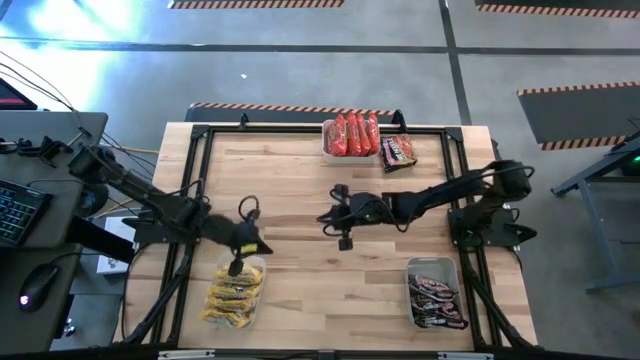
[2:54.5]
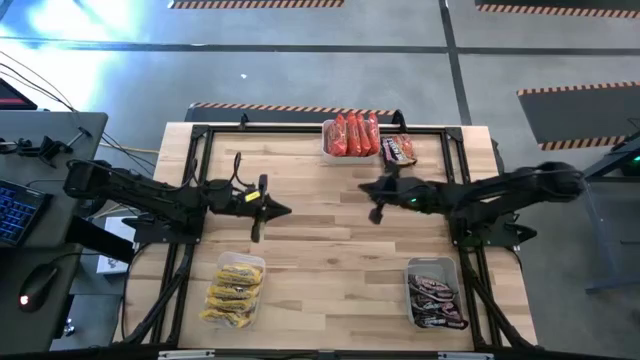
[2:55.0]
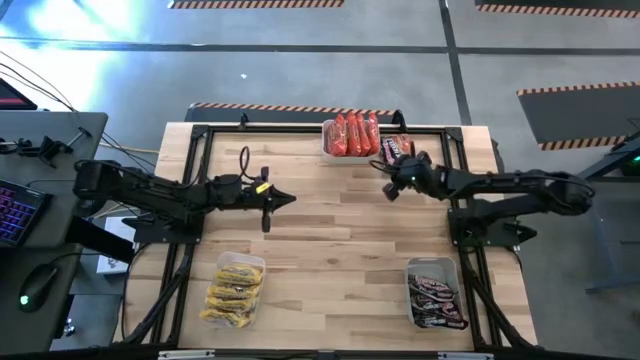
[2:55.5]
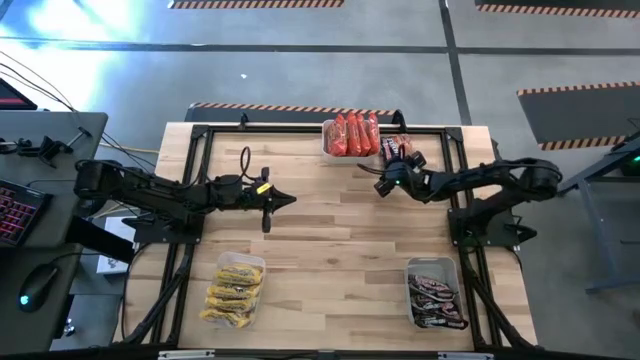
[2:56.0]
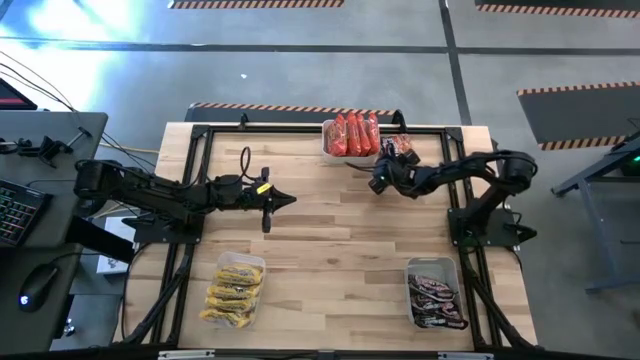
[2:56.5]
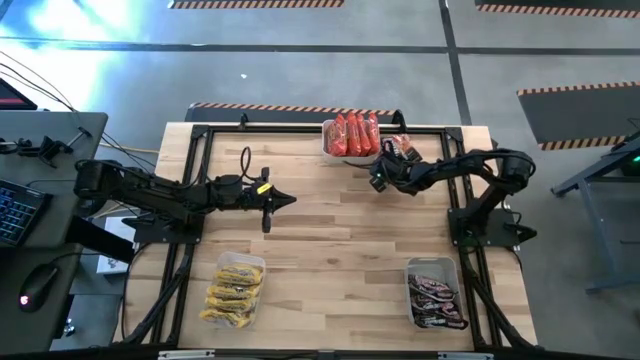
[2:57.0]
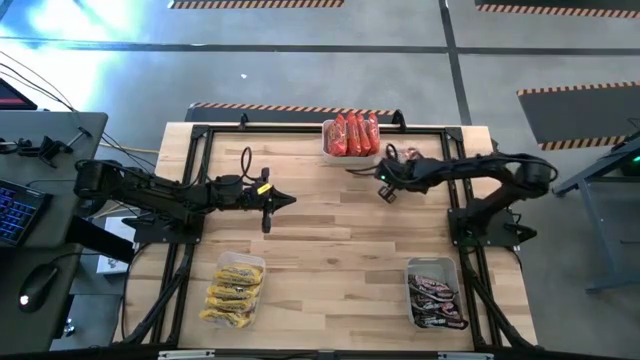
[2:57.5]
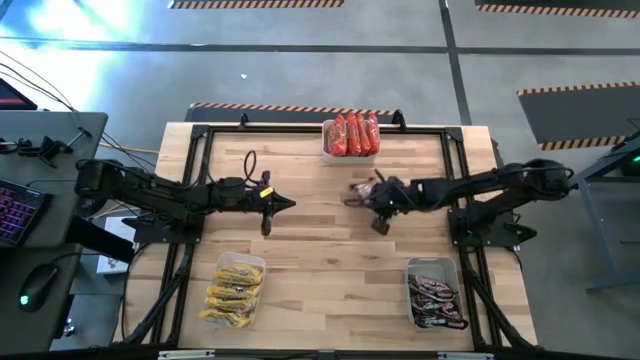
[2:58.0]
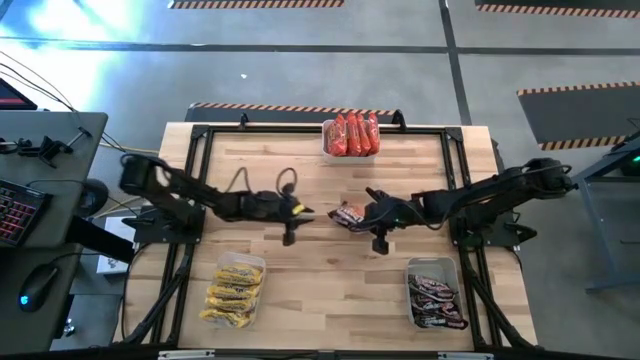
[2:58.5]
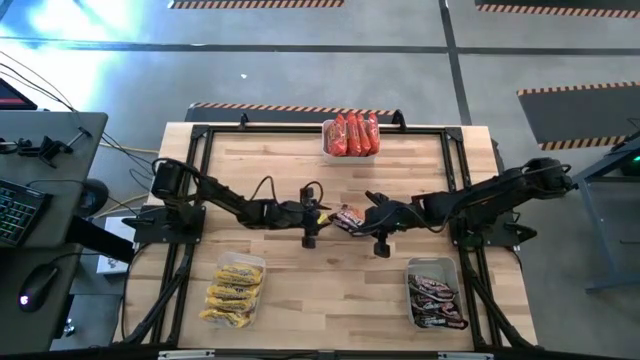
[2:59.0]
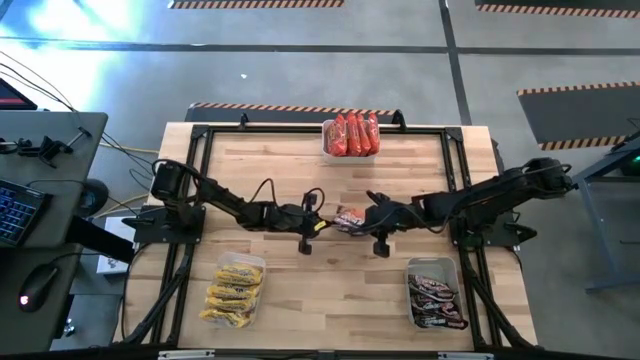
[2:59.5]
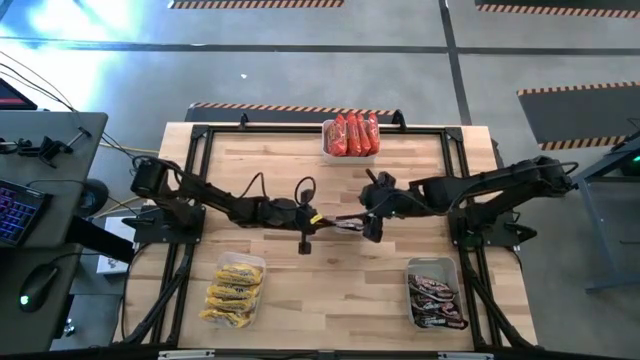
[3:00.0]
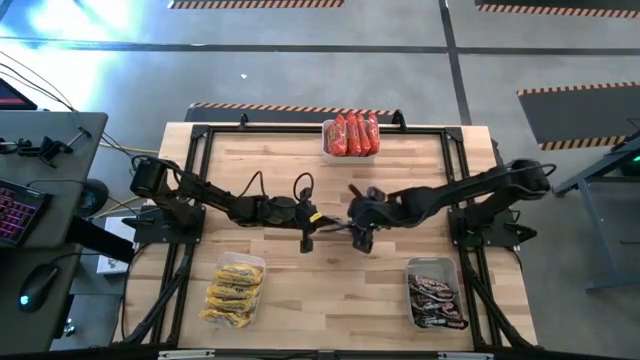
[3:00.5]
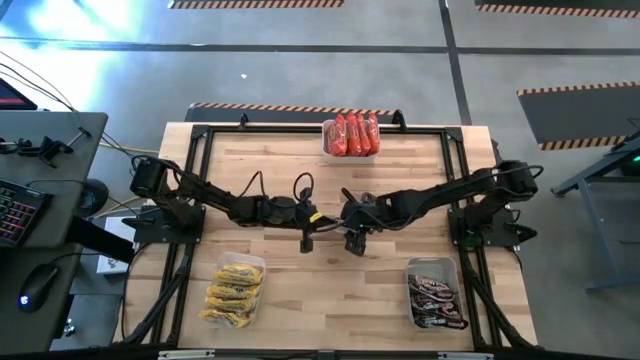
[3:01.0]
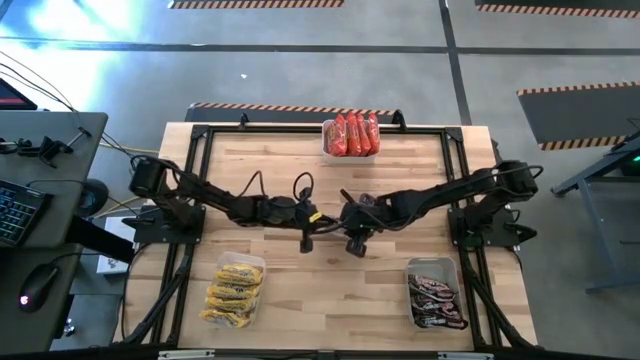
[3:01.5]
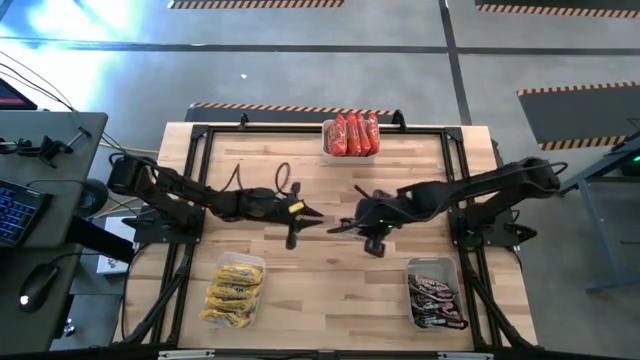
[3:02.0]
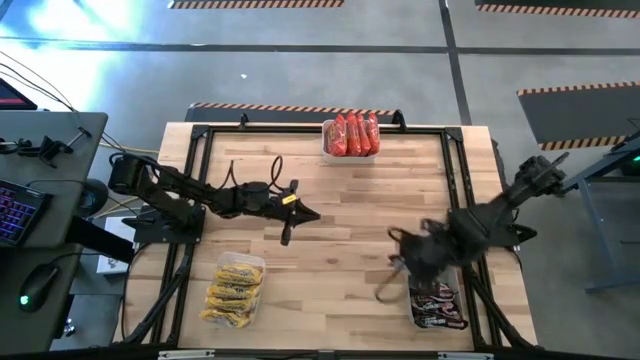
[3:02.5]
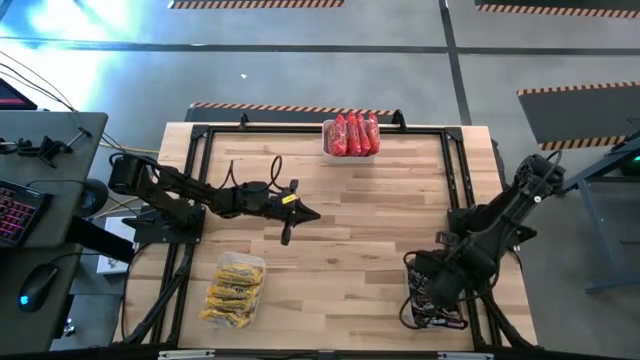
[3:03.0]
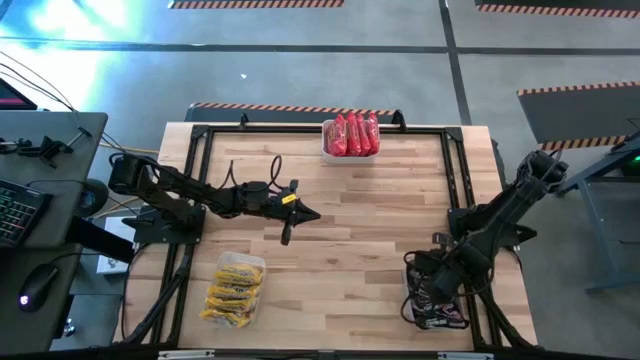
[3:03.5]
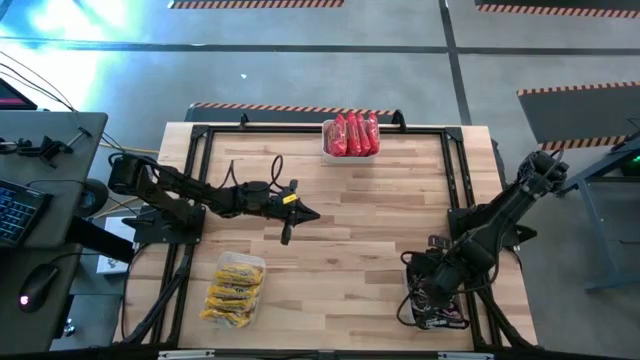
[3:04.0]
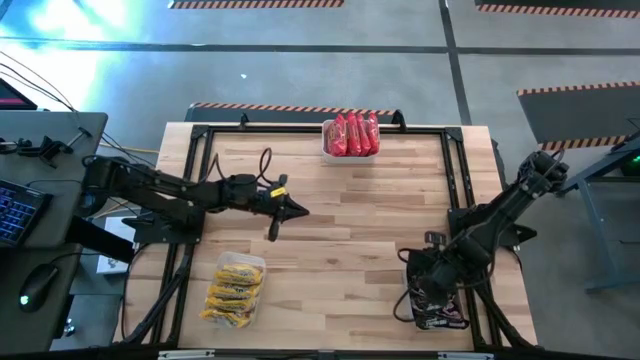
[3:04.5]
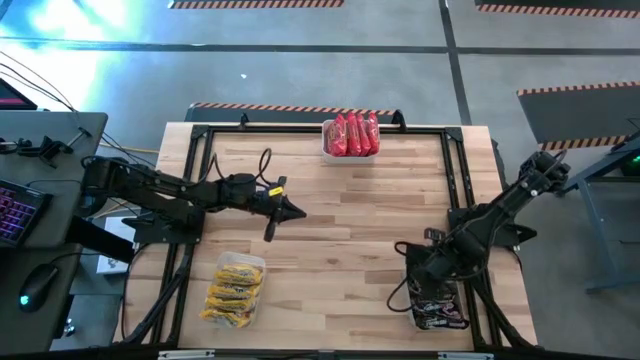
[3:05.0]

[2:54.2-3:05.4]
Task: Sort Maruchan noodles
Put the black noodle pack into the gray bin

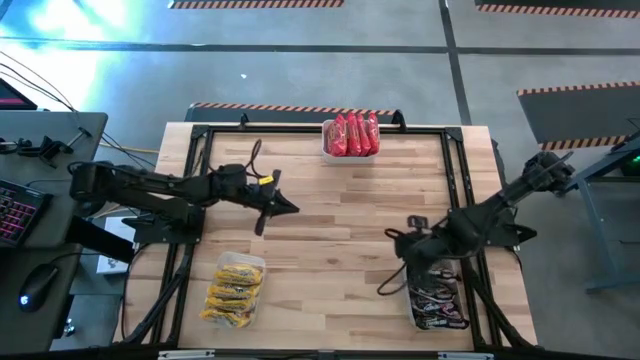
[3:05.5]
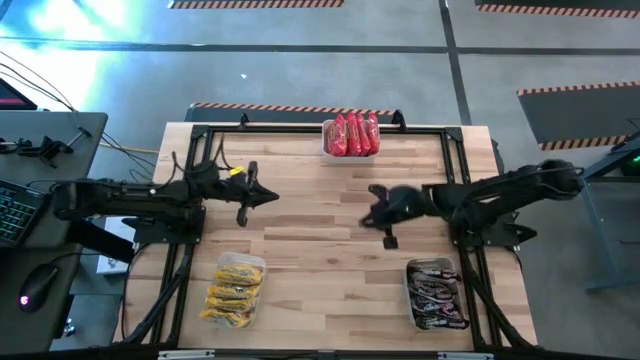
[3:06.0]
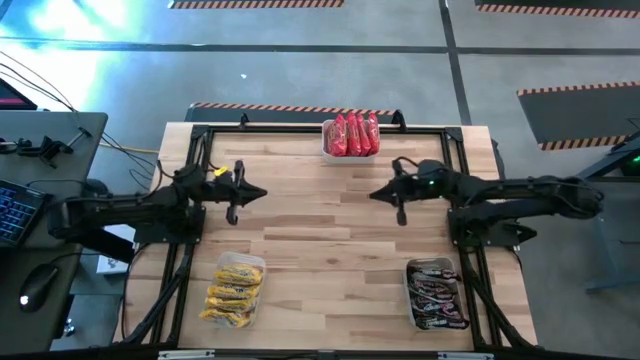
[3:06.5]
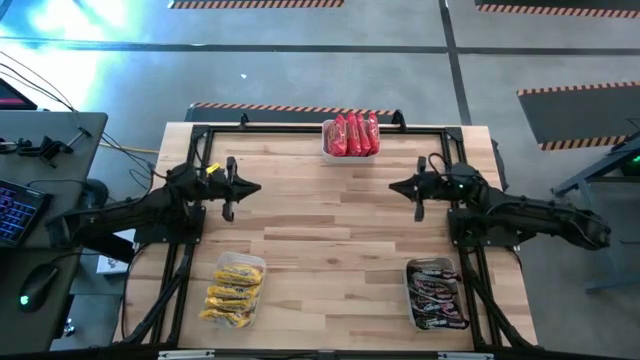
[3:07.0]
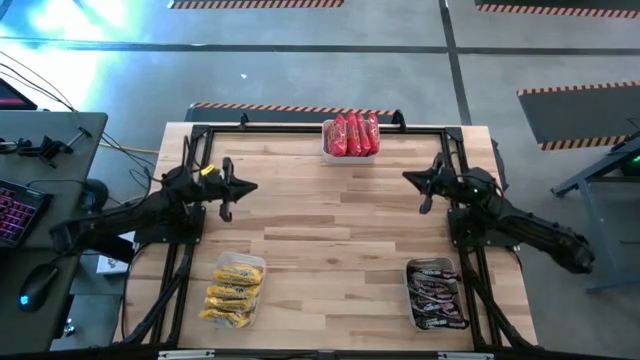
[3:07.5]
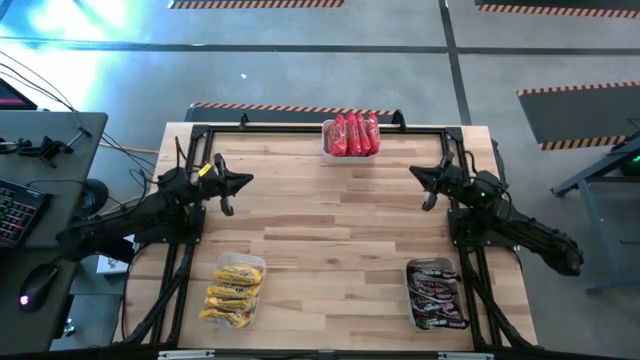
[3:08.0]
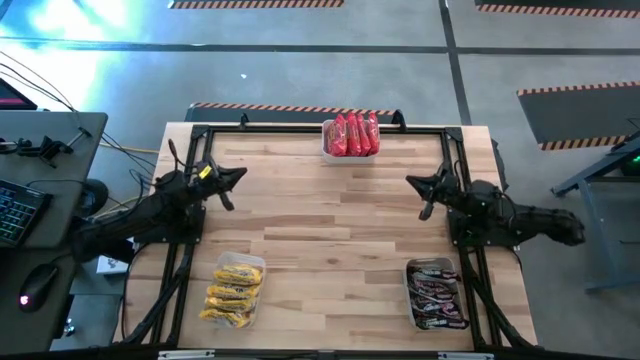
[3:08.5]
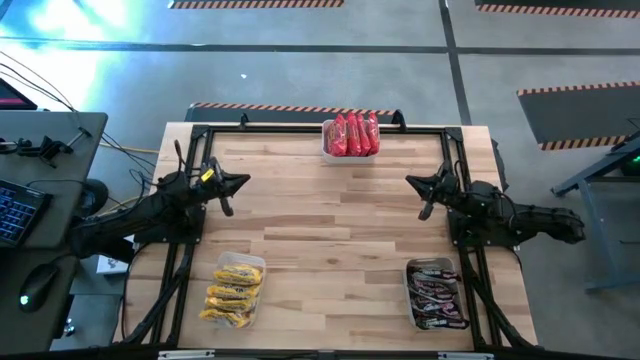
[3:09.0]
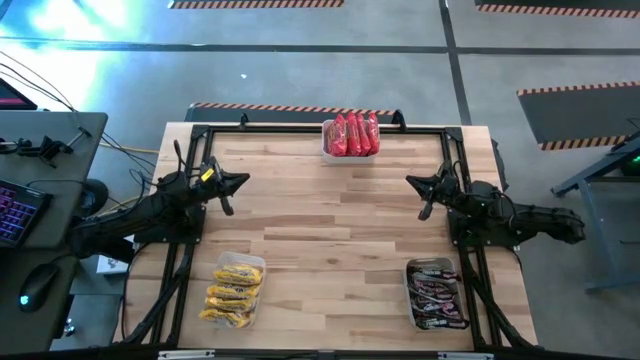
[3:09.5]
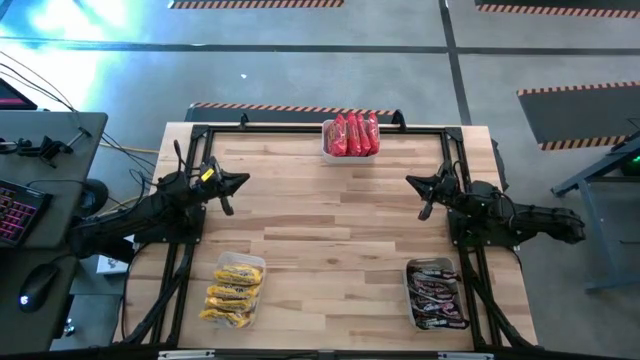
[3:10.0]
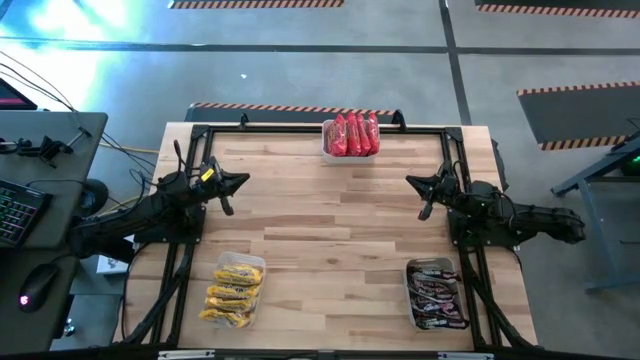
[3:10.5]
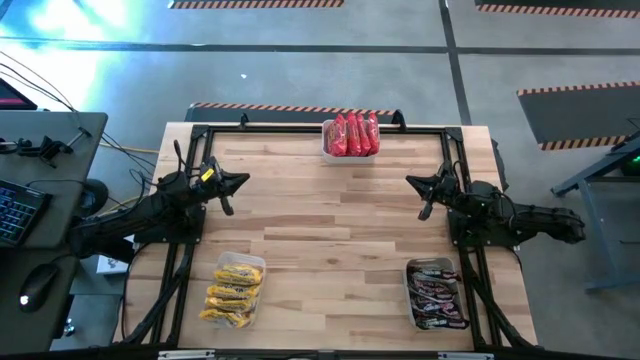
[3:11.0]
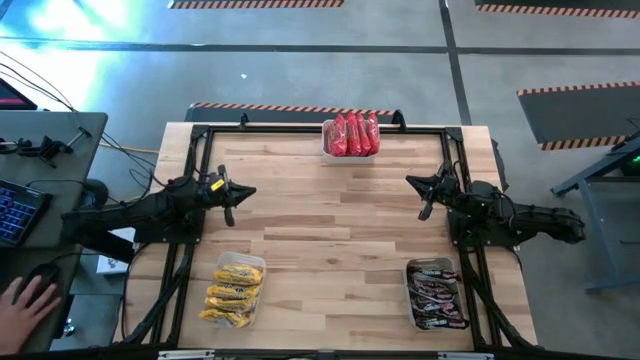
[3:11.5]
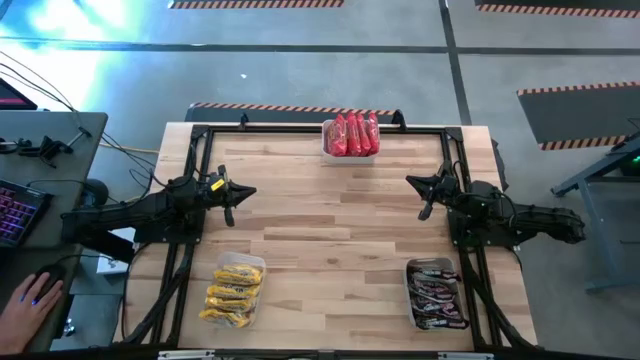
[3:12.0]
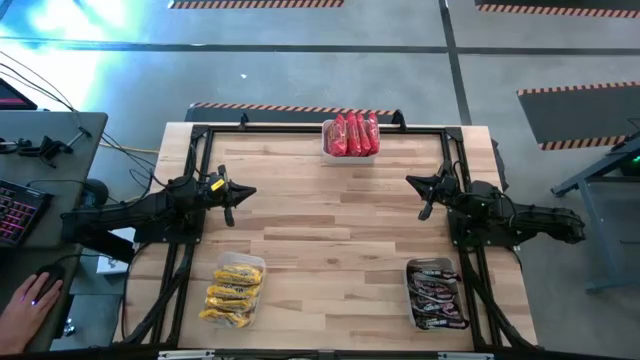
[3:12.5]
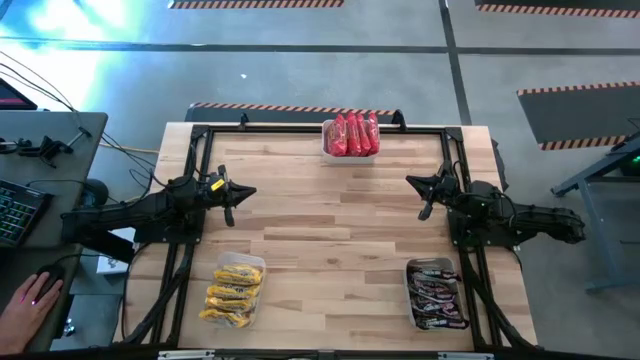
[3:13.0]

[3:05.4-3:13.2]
Return to Home Position

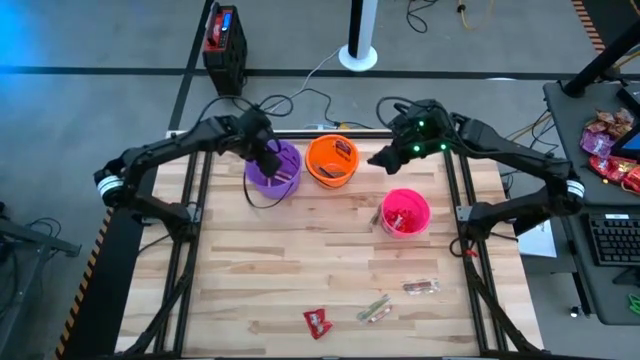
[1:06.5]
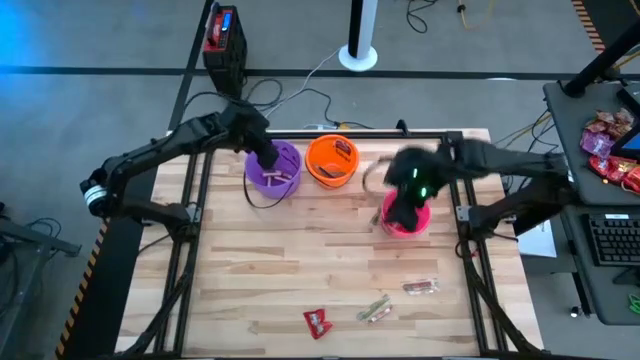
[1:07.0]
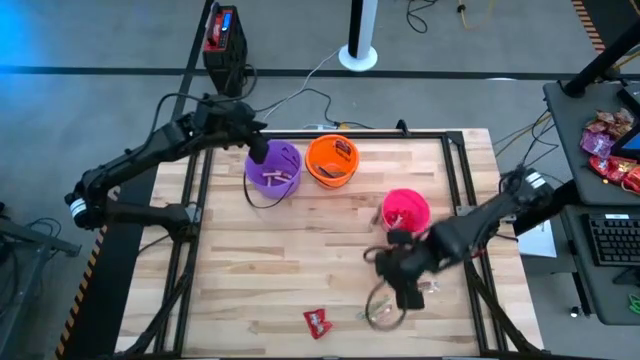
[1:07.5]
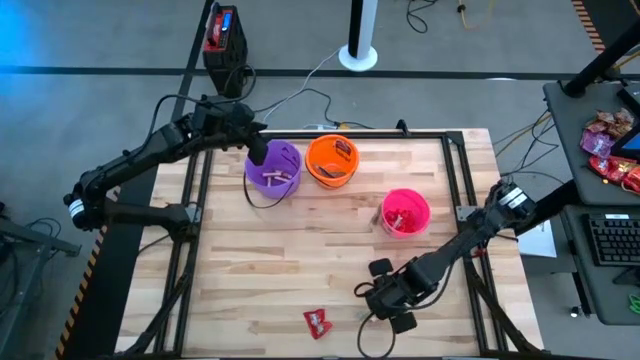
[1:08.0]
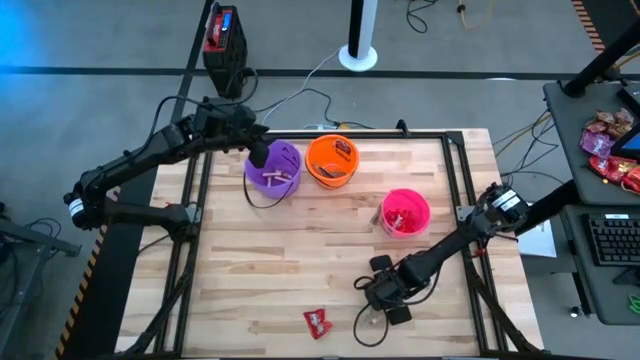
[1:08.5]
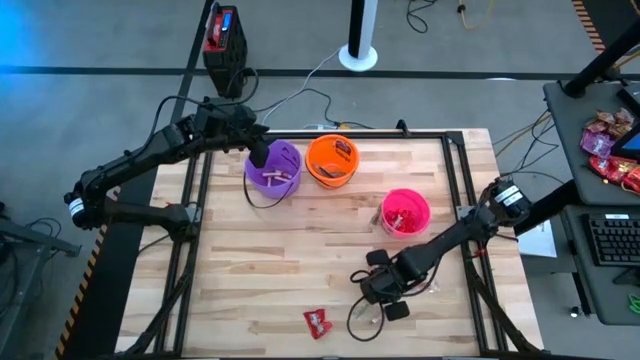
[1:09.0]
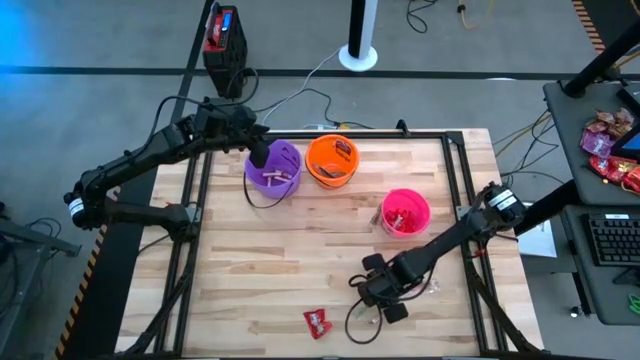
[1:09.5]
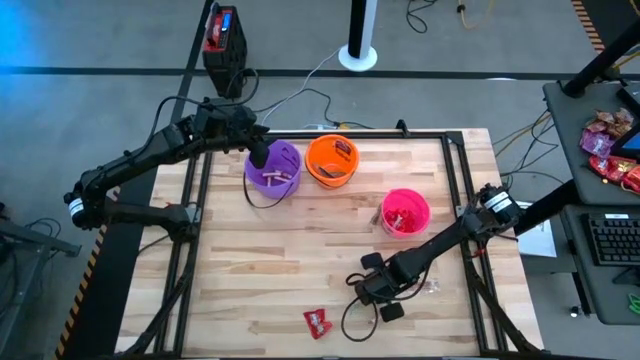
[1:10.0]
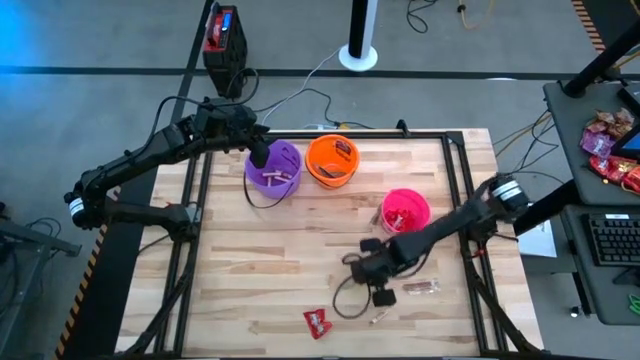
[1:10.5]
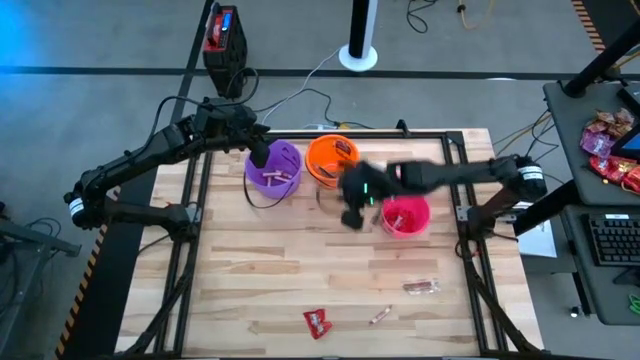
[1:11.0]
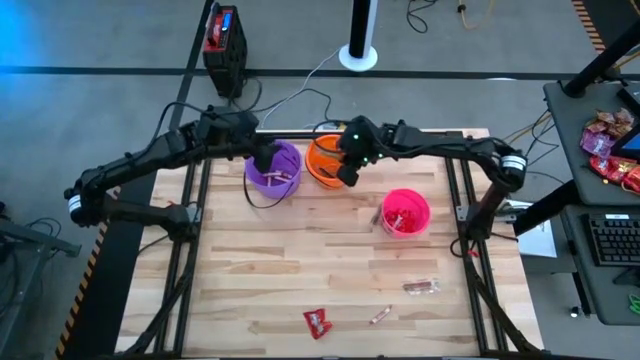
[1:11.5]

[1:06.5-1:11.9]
Task: Sort candy by brand, put in halloween buckets
Put the green candy into the orange bucket
